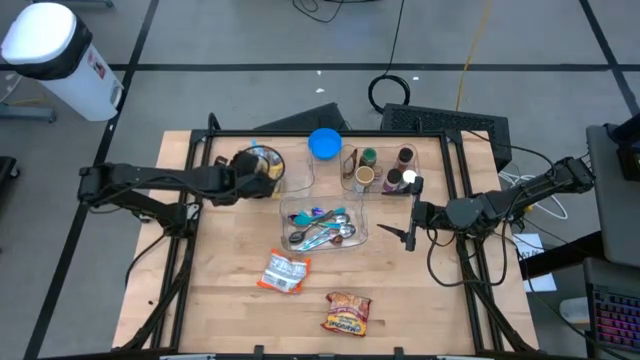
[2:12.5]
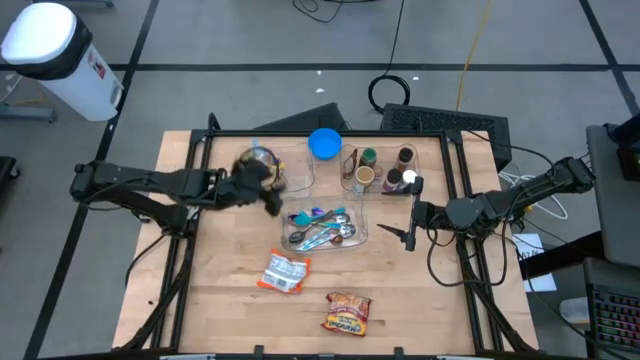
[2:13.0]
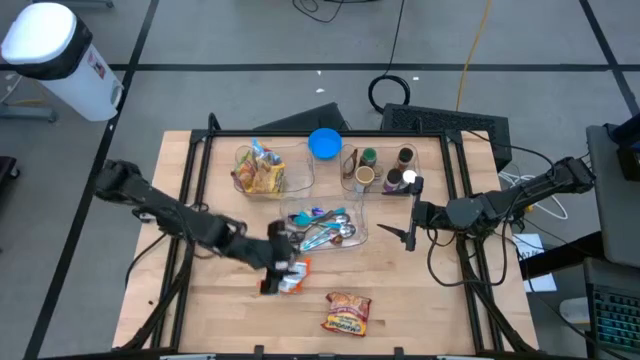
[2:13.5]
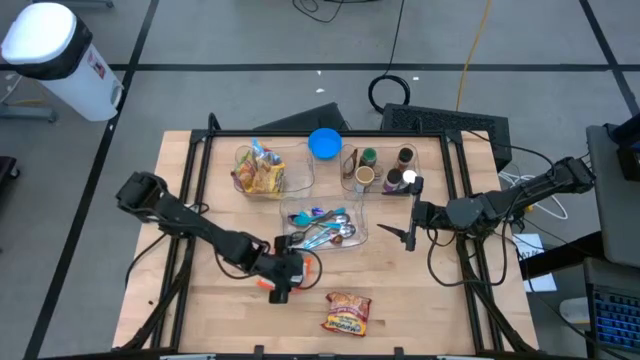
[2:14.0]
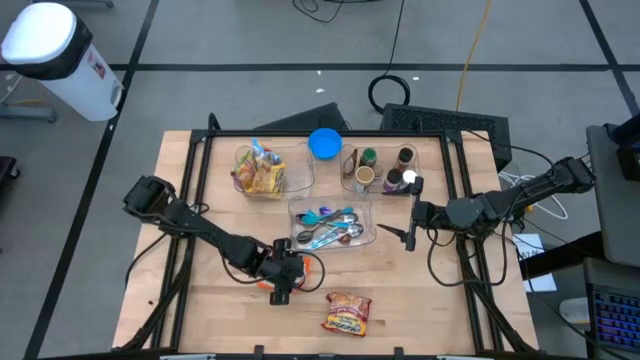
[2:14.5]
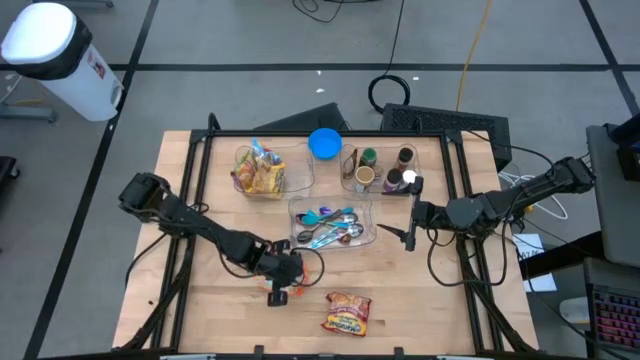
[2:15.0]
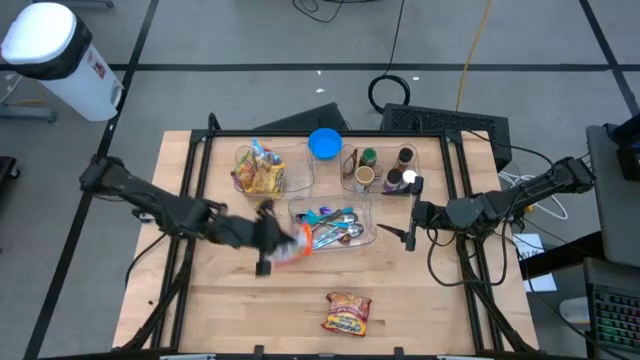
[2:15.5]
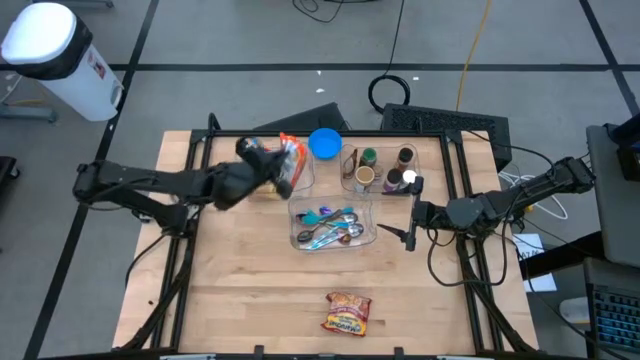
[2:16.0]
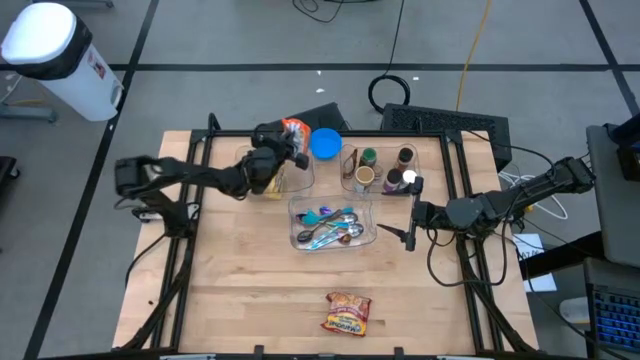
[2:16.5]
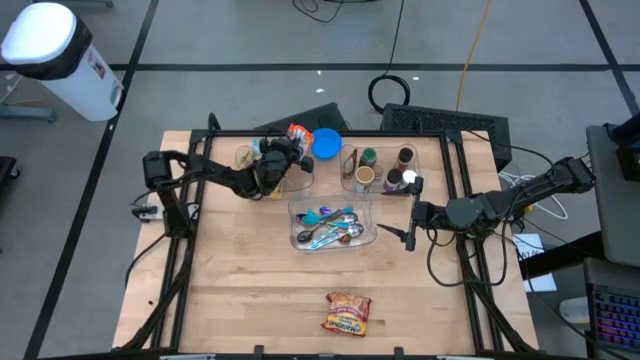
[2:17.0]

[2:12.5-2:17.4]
Task: Pick & Place Food Item
Put the orange noodle bag into the top left transparent bin

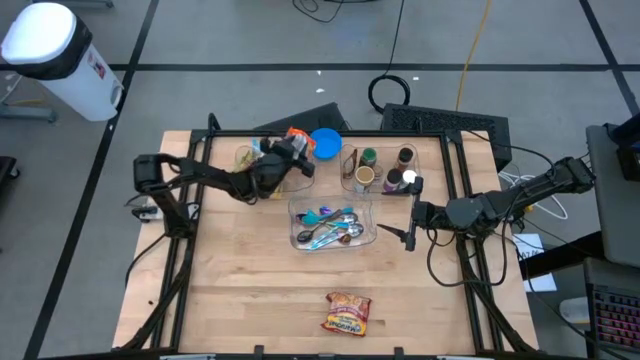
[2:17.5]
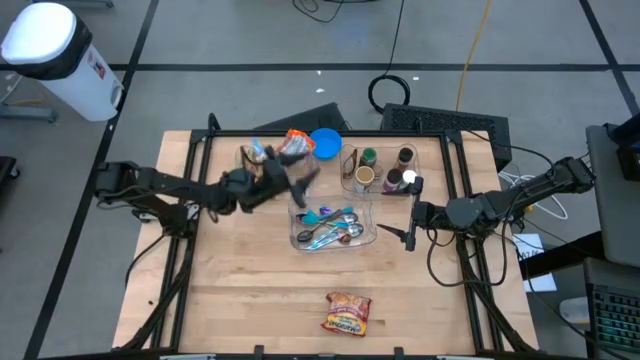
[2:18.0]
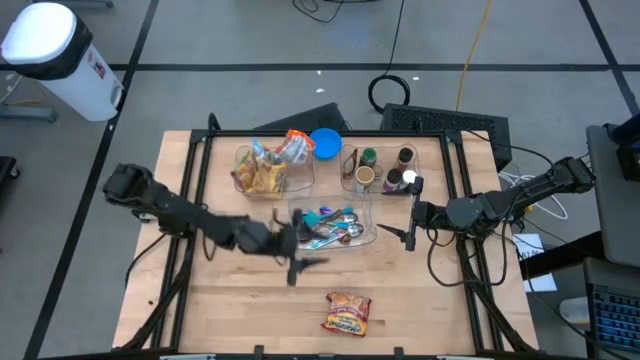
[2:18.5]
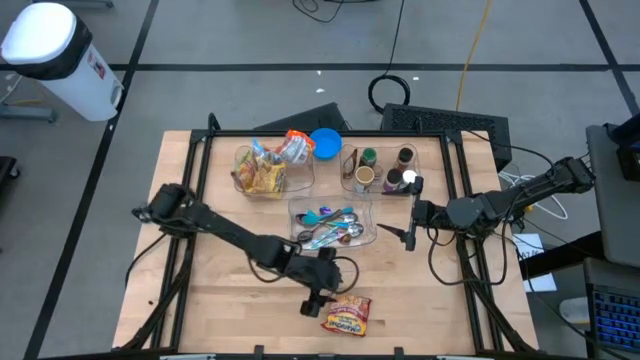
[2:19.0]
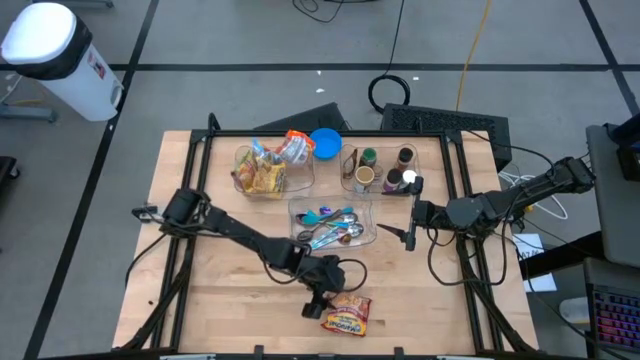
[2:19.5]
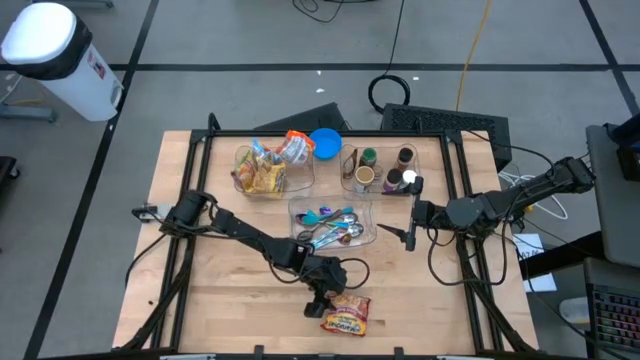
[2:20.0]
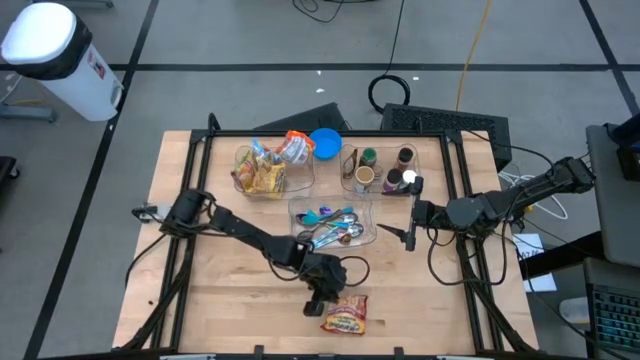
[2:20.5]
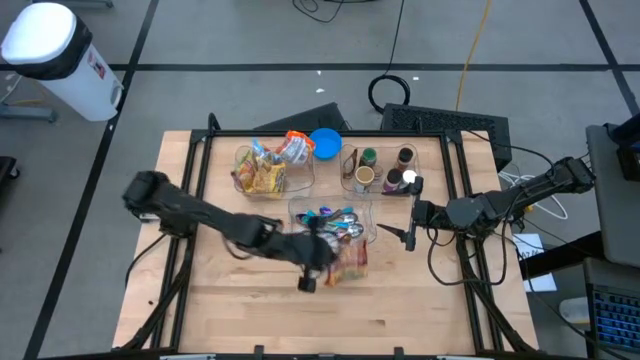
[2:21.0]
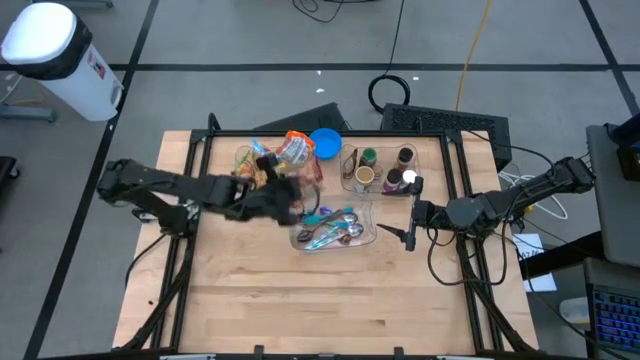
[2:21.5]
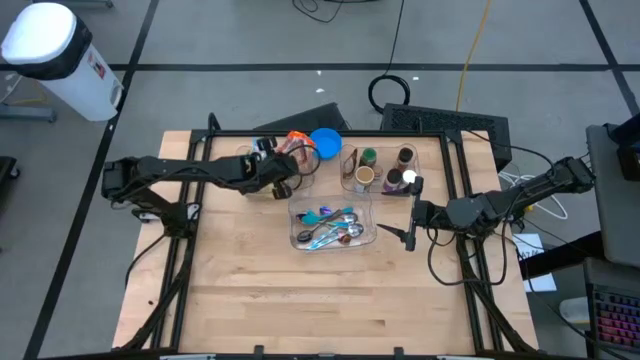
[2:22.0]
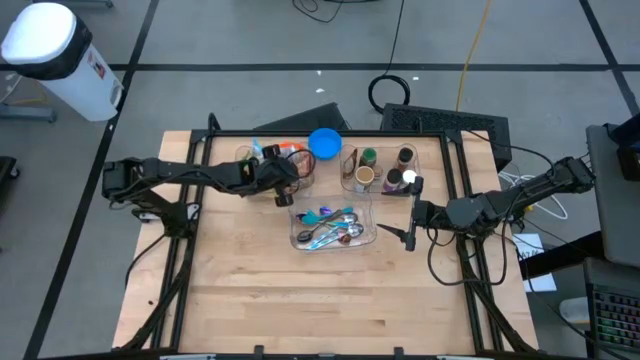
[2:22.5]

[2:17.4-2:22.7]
Put the red noodle bag into the top left transparent bin

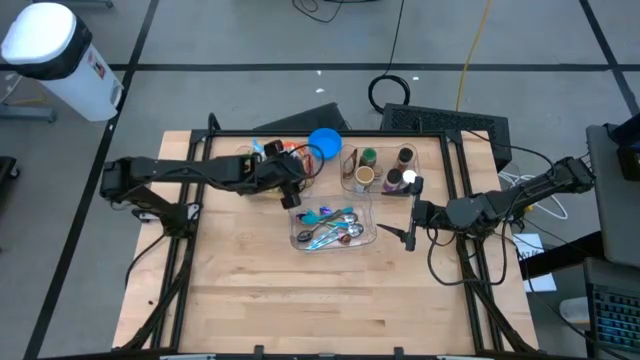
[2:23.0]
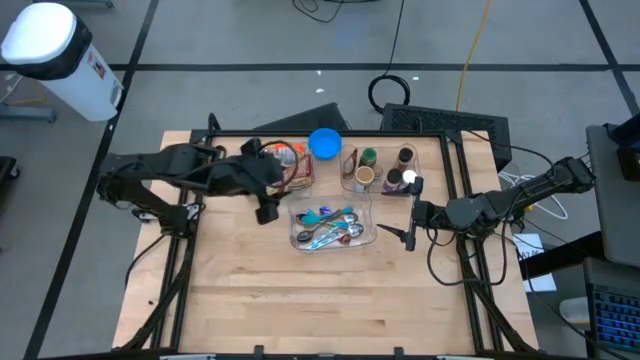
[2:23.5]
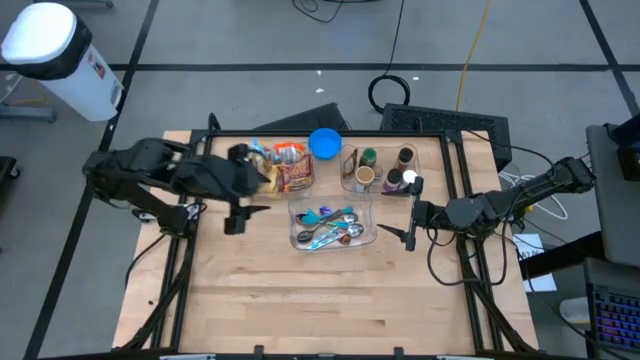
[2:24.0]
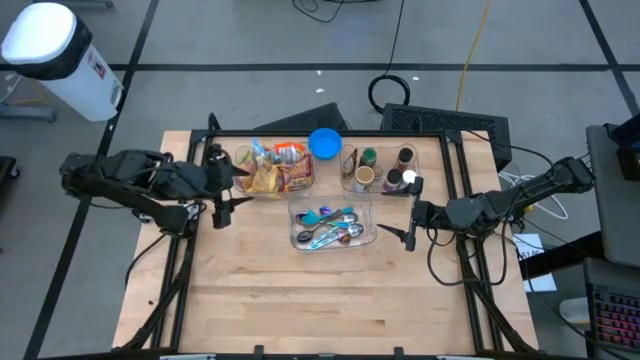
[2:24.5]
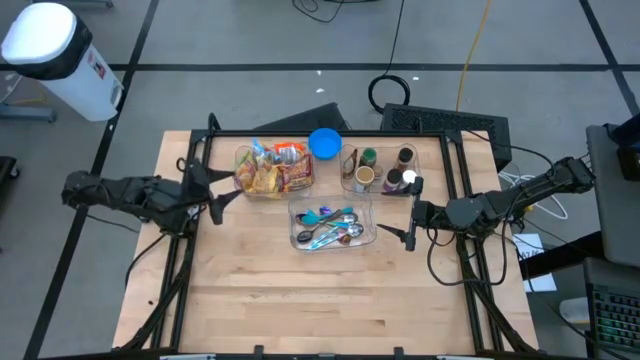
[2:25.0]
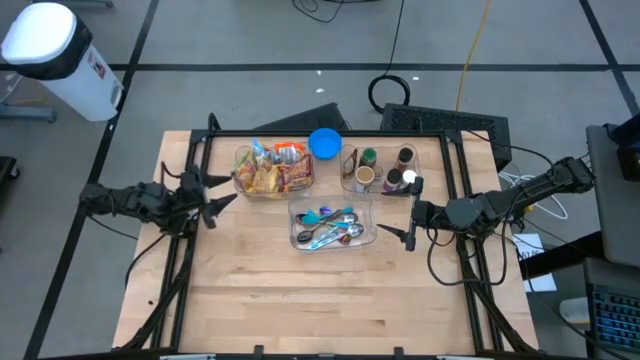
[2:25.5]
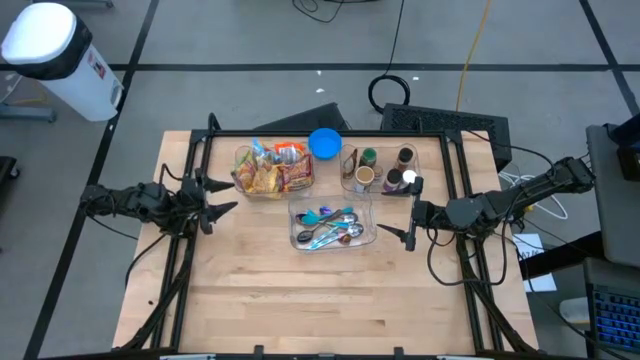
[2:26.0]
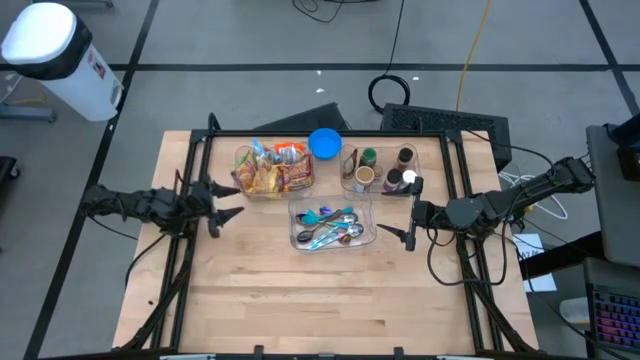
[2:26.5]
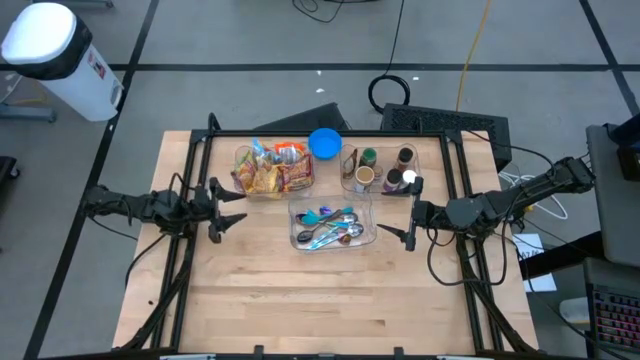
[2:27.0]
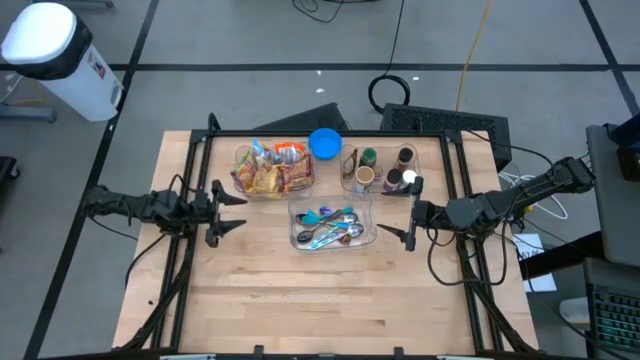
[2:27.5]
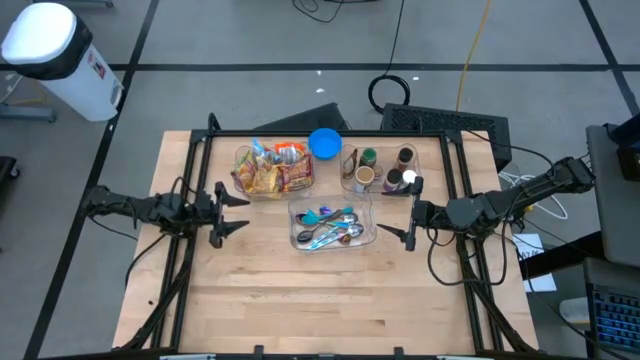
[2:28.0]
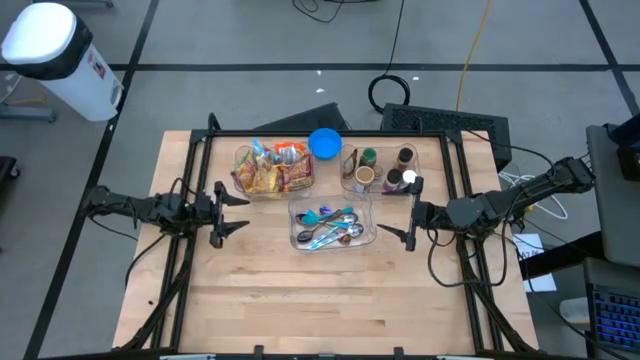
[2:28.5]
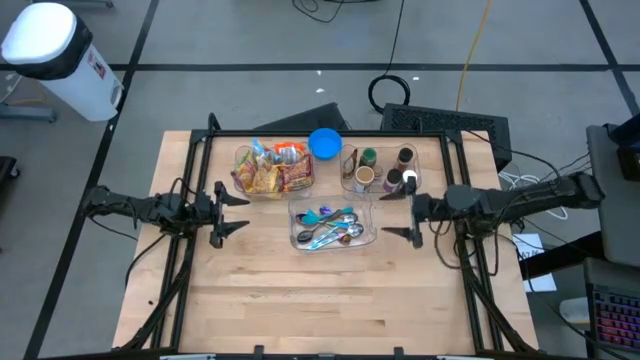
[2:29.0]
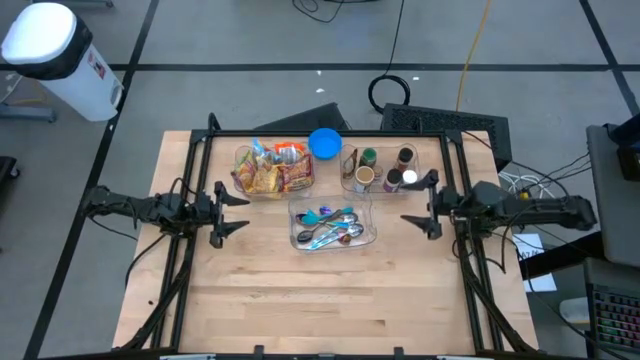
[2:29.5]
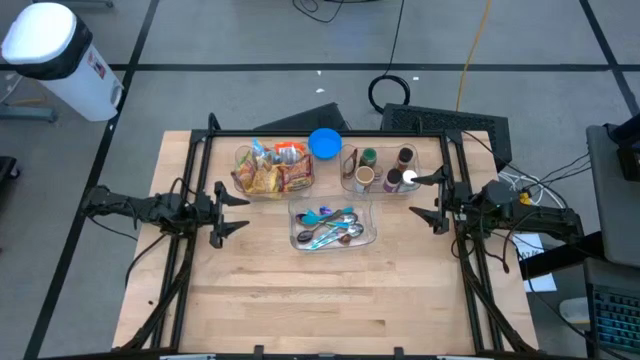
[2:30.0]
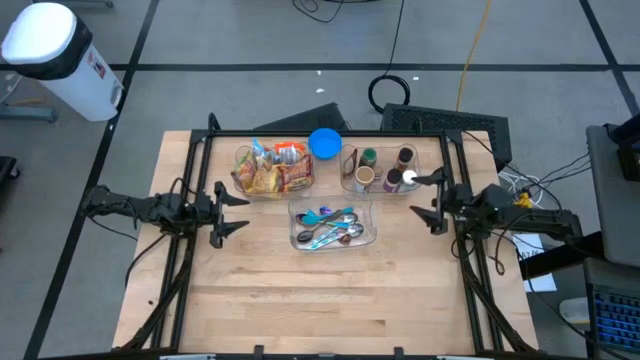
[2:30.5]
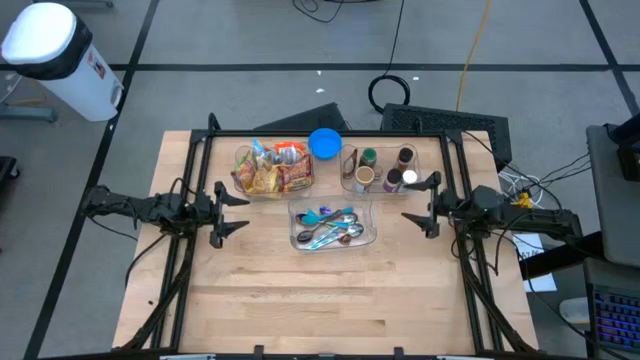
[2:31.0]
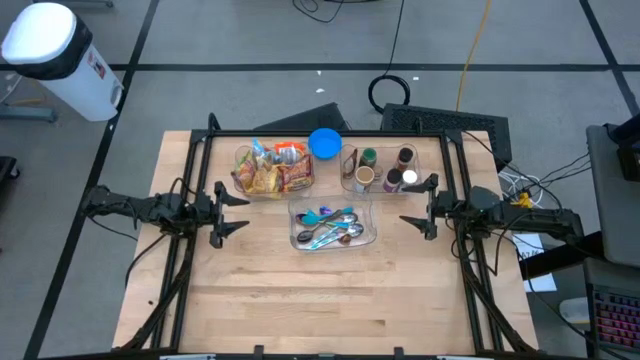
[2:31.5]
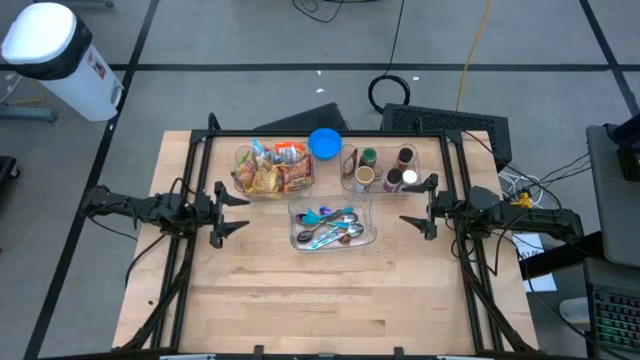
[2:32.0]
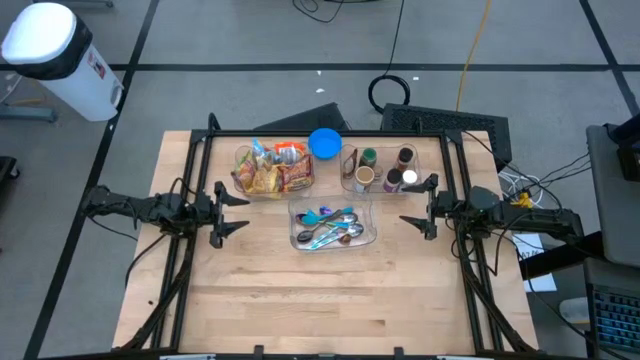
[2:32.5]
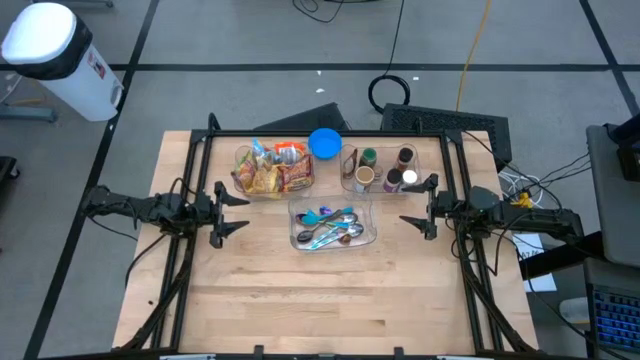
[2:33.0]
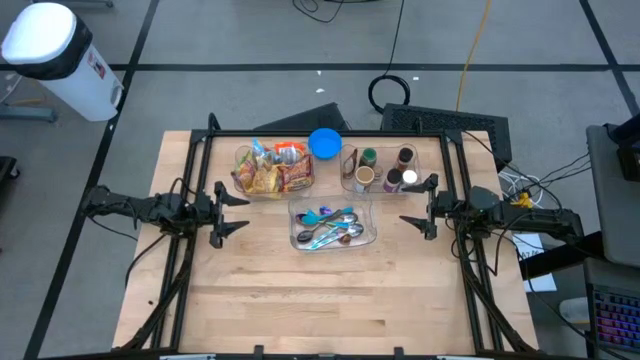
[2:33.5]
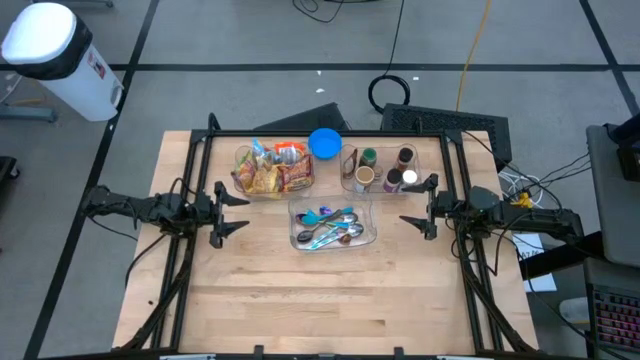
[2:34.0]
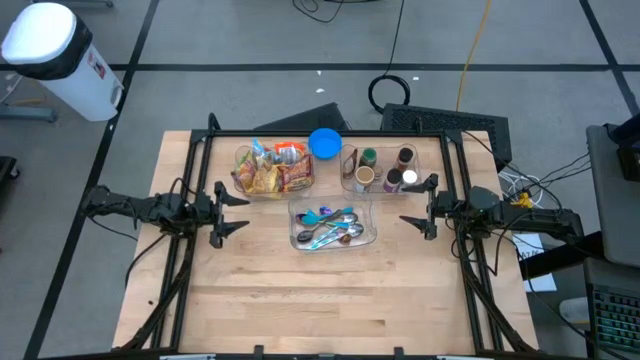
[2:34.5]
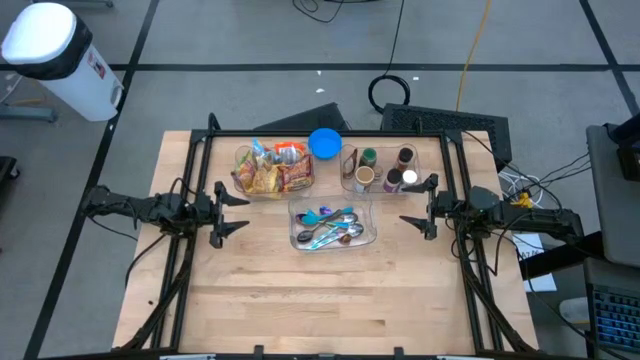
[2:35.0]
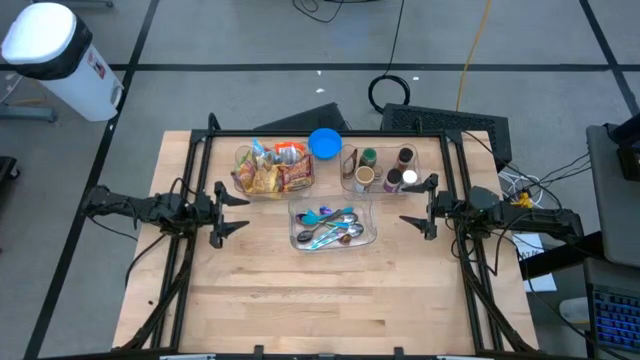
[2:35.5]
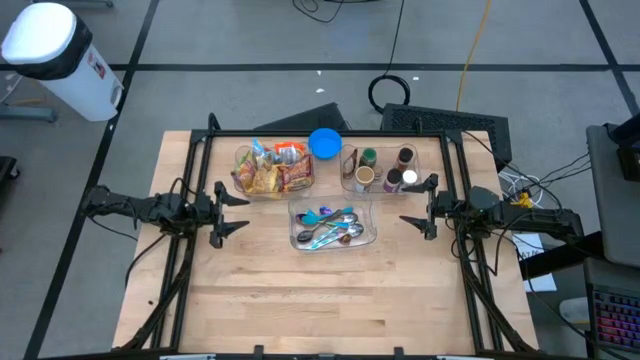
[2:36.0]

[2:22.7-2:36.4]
Return to Home Position
